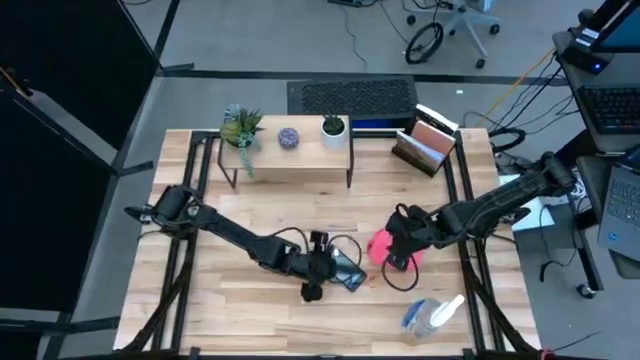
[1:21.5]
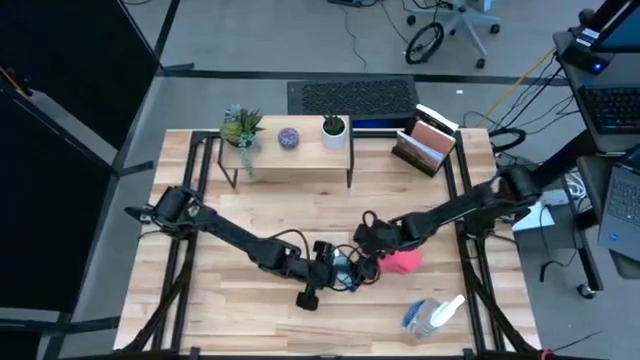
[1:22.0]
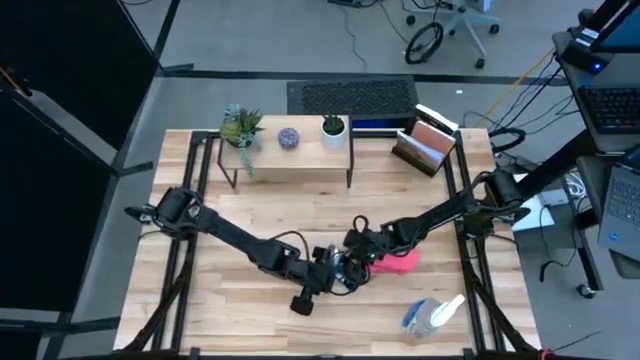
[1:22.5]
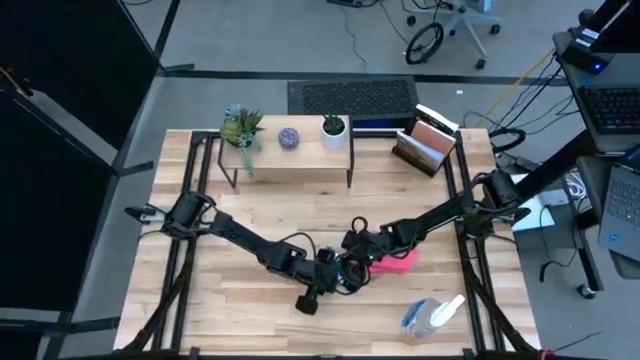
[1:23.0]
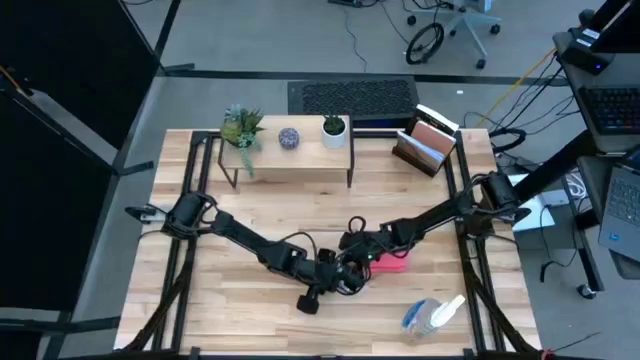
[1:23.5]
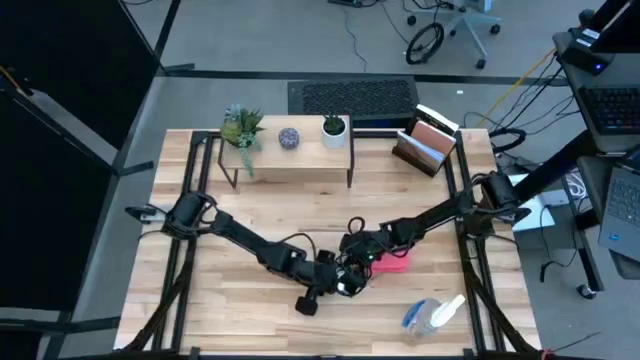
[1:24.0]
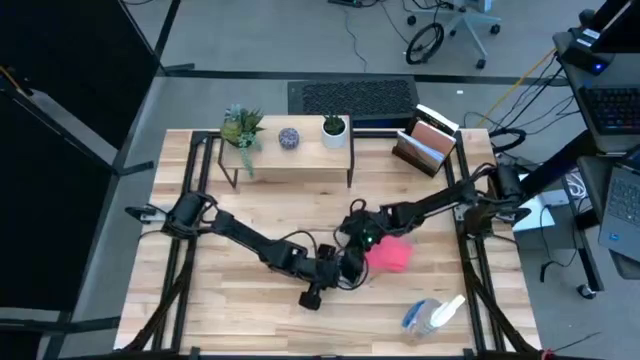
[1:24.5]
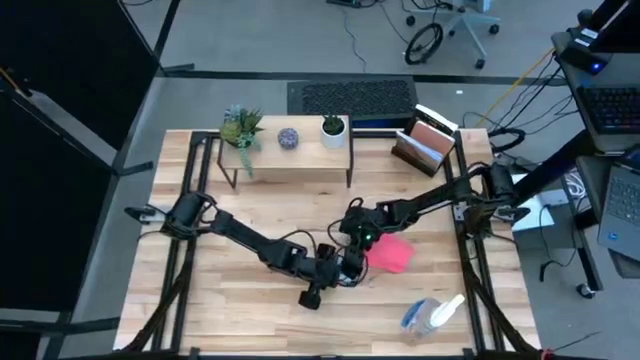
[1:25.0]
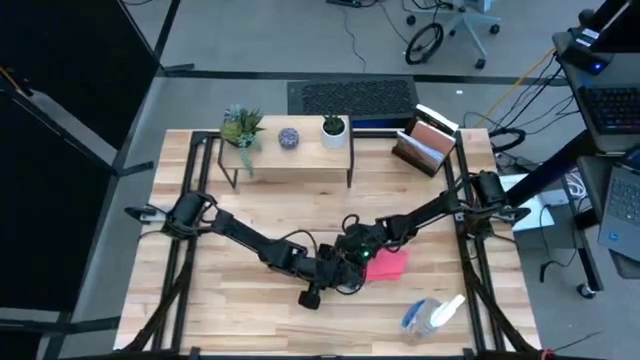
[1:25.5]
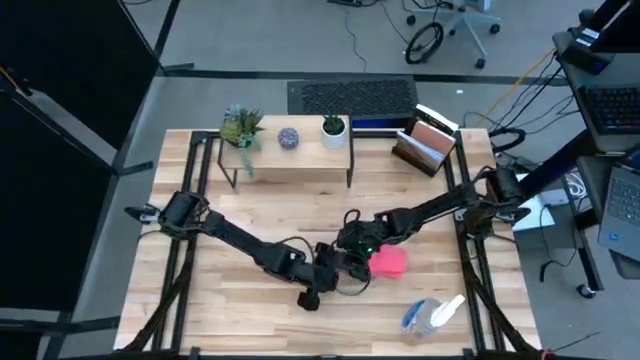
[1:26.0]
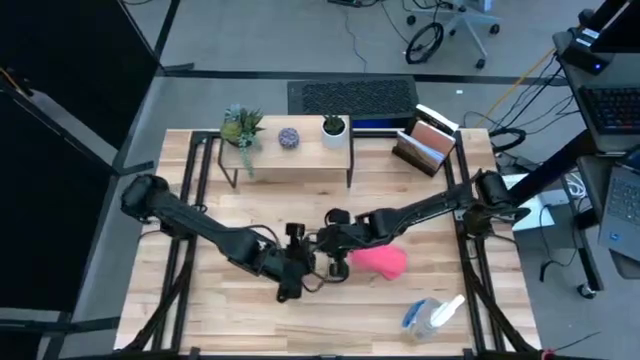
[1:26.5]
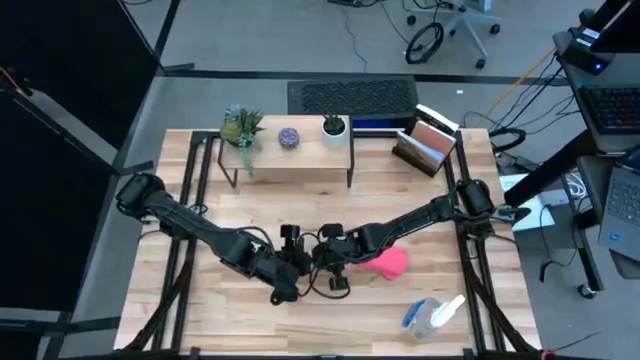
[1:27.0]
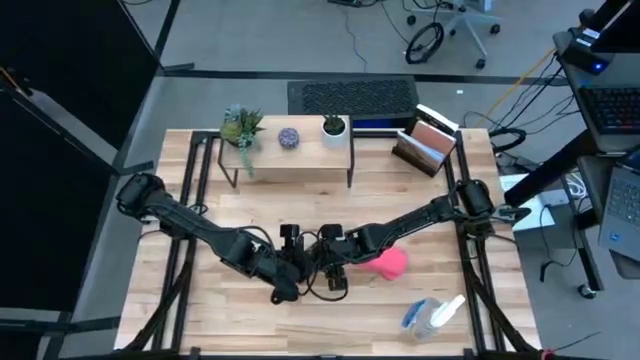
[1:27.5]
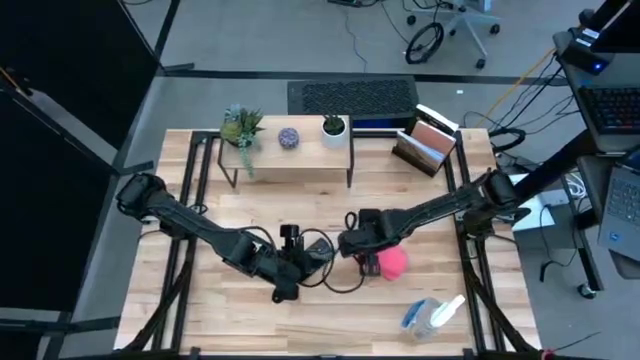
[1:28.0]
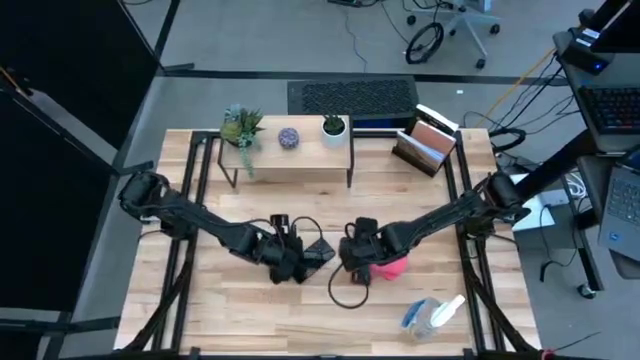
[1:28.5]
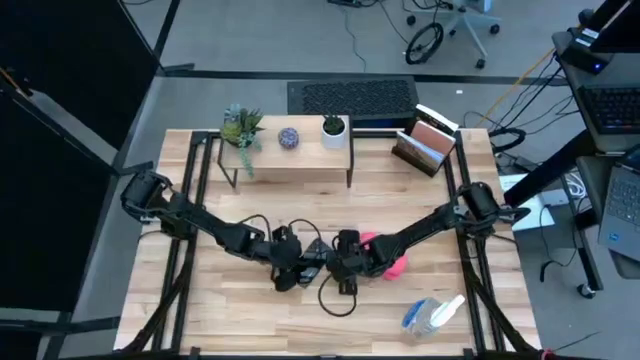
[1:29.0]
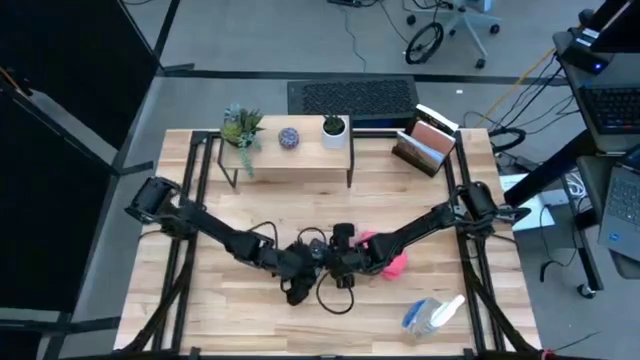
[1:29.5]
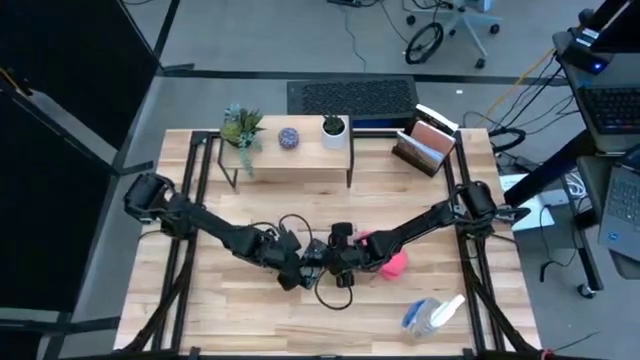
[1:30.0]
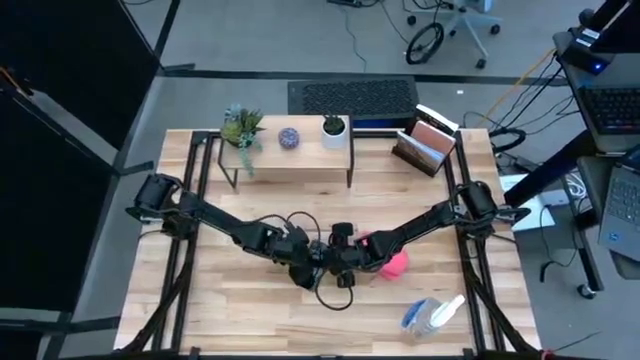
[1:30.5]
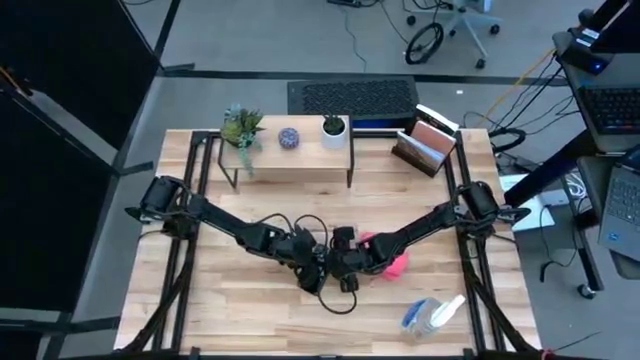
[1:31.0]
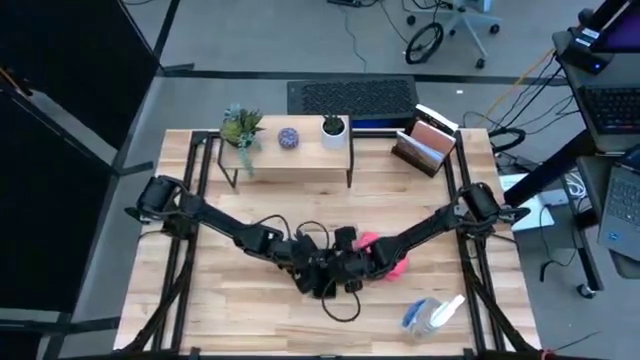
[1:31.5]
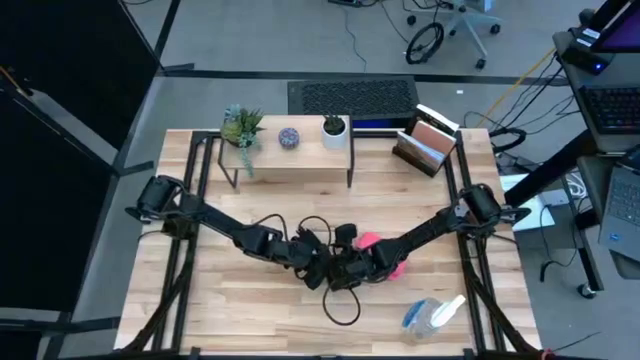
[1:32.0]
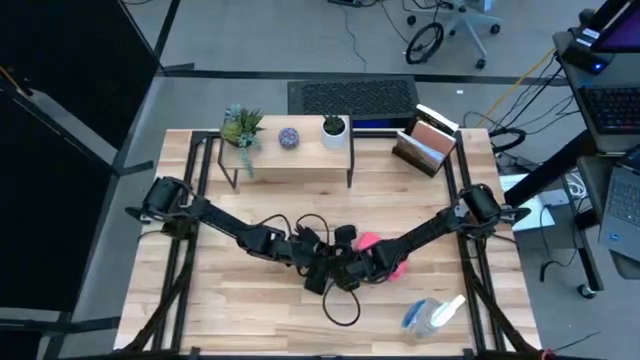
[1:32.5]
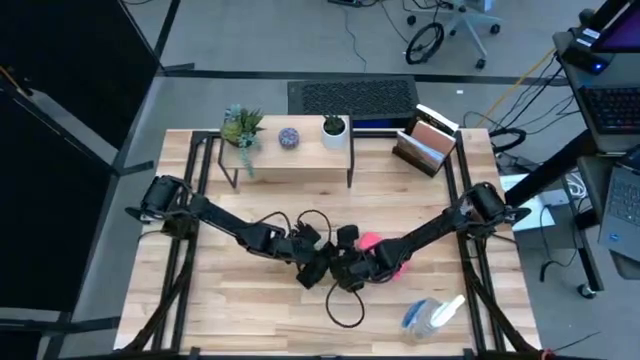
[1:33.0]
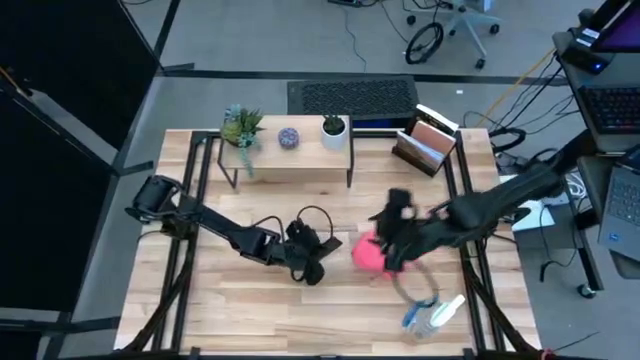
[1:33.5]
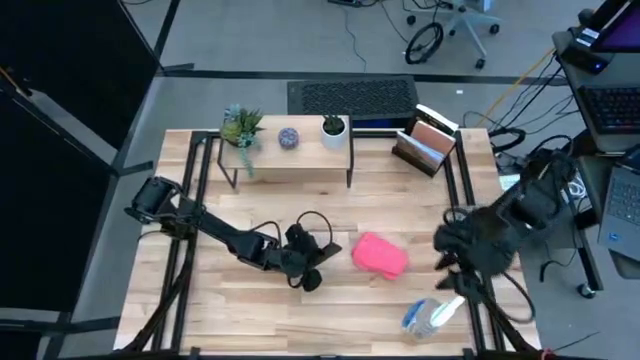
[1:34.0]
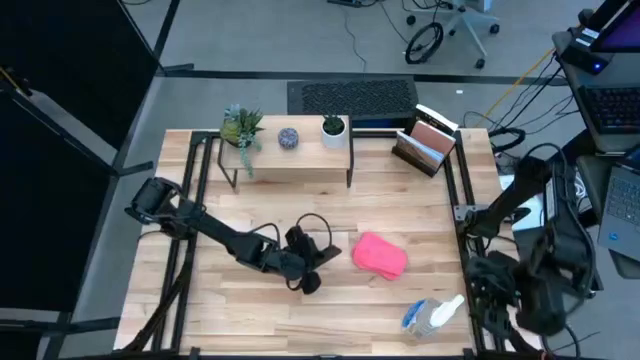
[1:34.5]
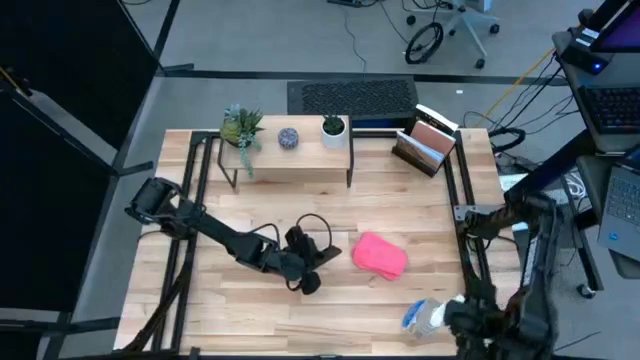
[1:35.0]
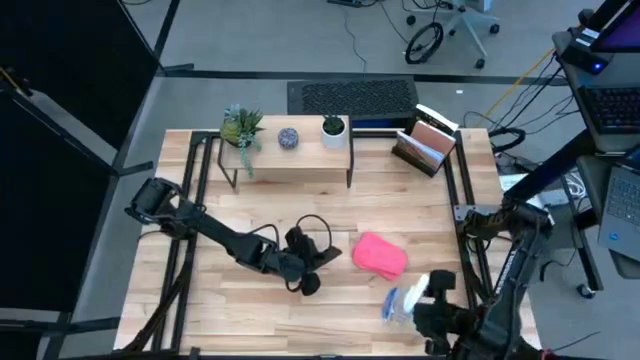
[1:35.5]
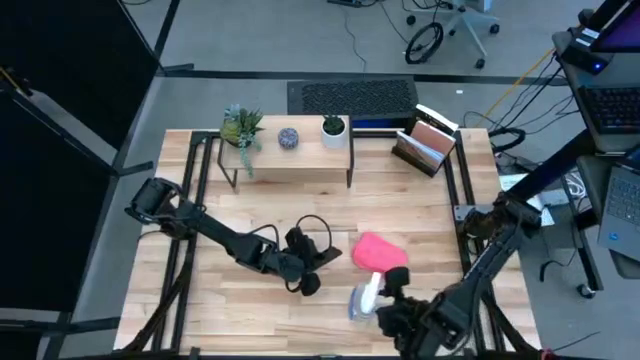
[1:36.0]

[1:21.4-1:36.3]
Task: Apply microfiber cloth
Spray the back of the cellphone using the spray bottle

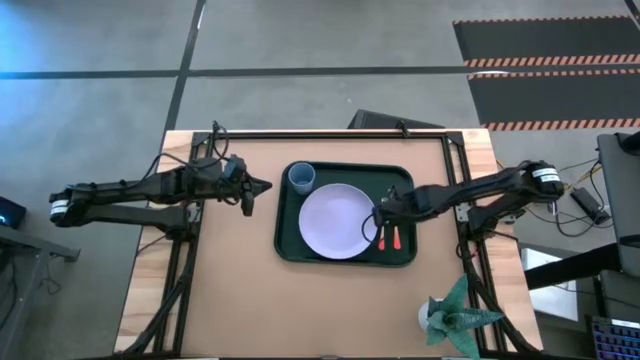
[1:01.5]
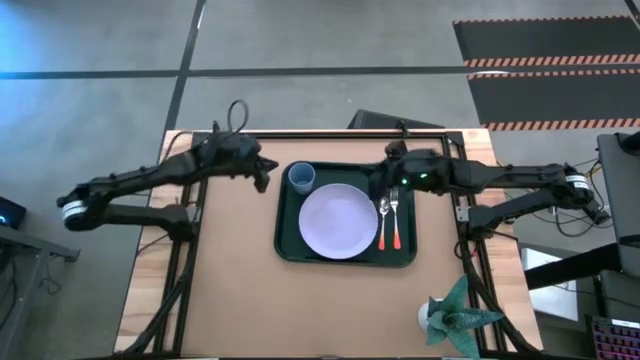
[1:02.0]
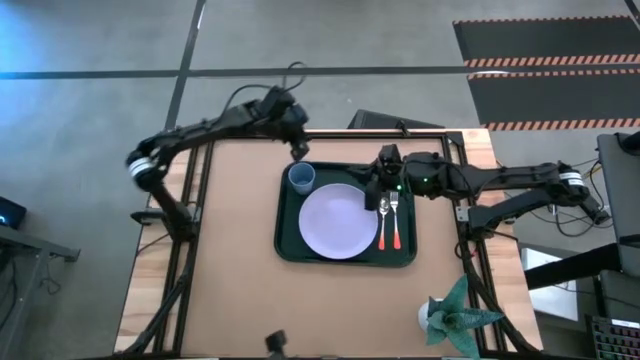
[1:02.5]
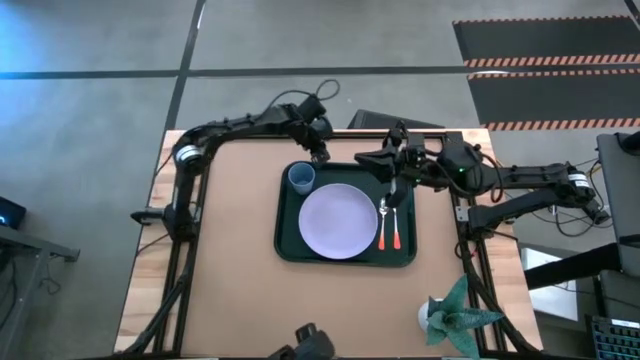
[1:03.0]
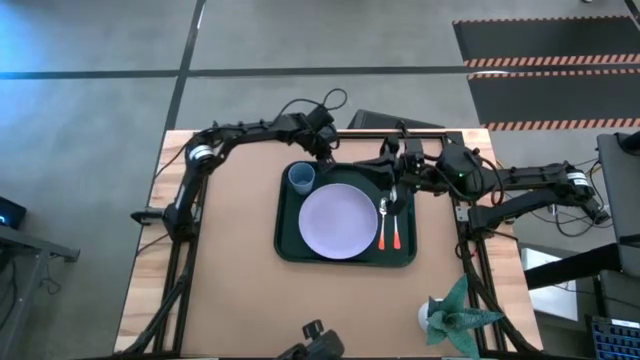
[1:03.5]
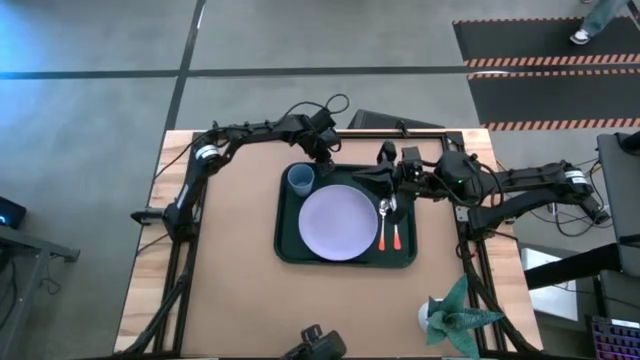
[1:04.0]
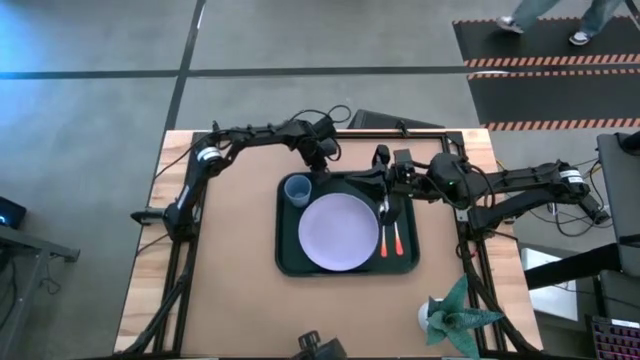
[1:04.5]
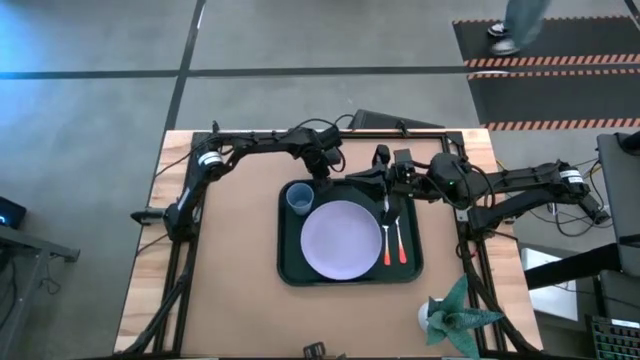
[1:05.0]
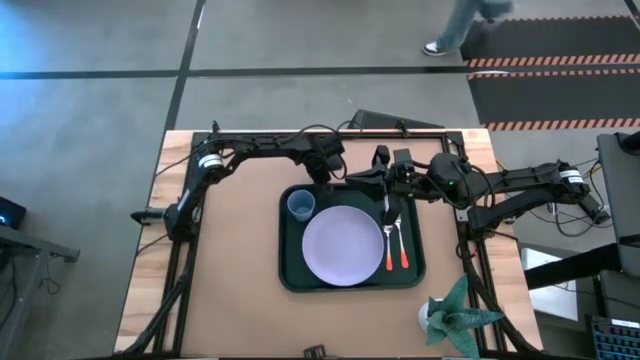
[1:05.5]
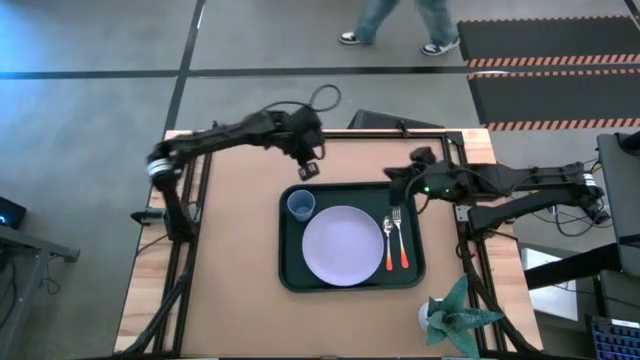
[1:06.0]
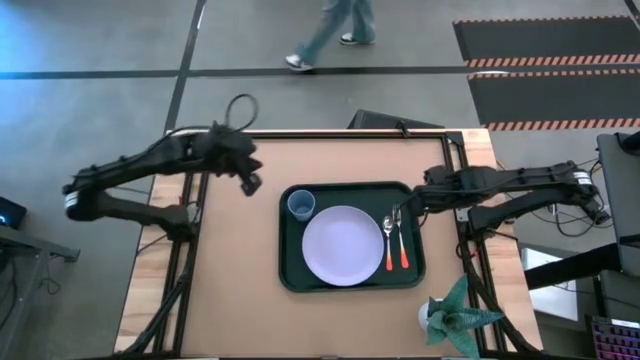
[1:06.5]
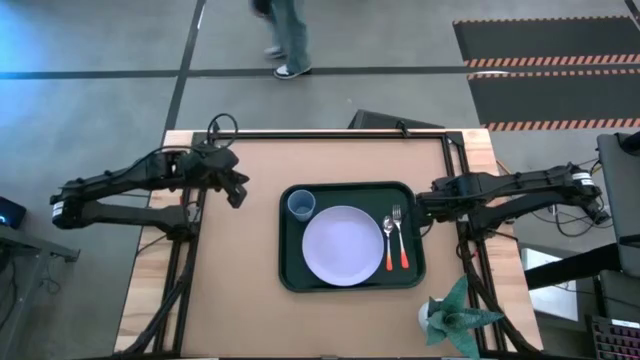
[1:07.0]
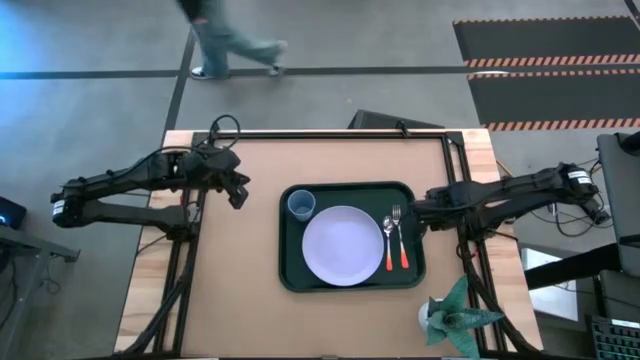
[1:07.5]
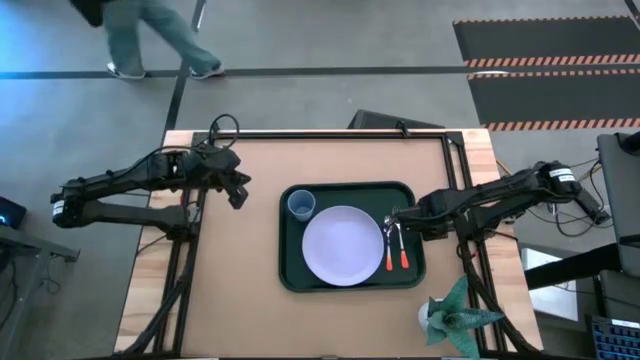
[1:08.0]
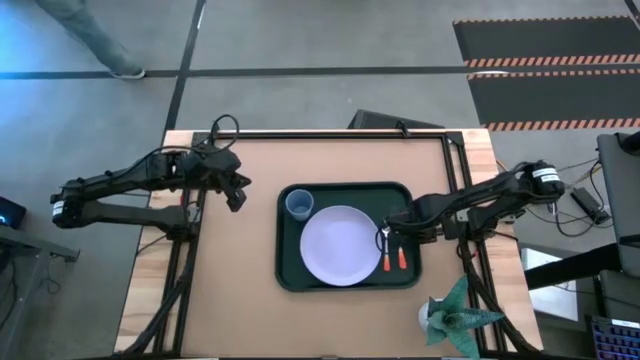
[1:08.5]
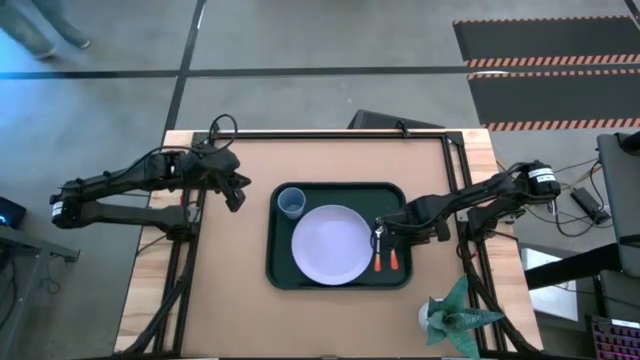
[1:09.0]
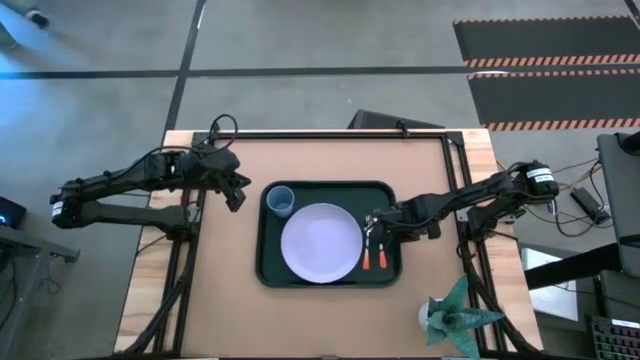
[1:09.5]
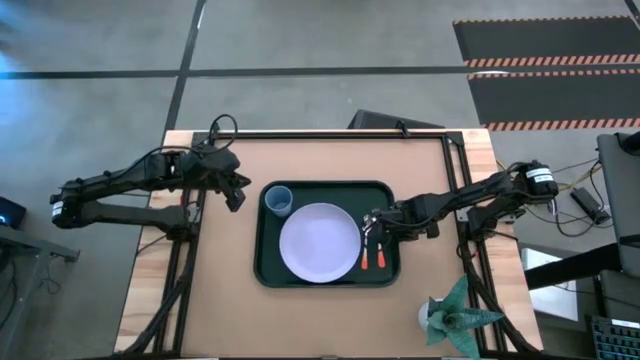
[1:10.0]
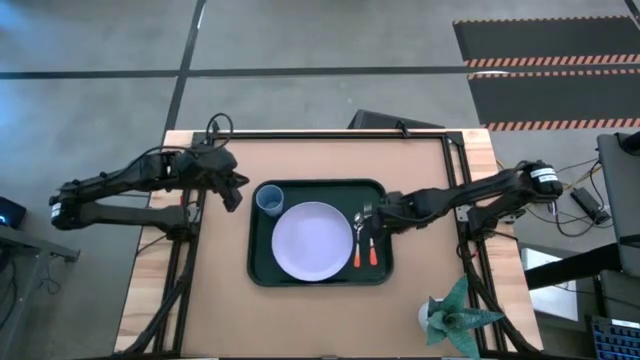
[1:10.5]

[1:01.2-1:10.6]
Task: Pick and place plate/cup/fork/spoon on tray
Move the black tray to the center of the table
